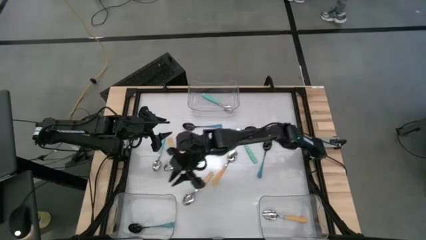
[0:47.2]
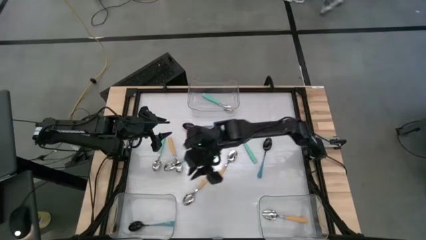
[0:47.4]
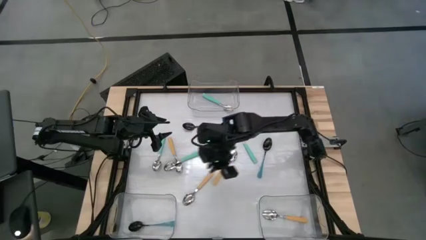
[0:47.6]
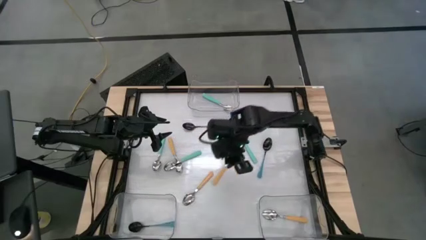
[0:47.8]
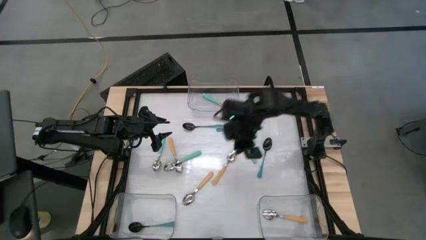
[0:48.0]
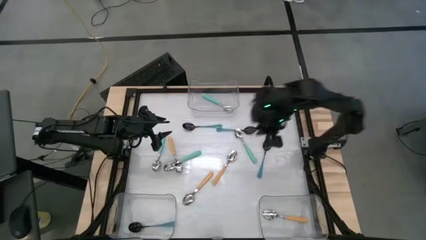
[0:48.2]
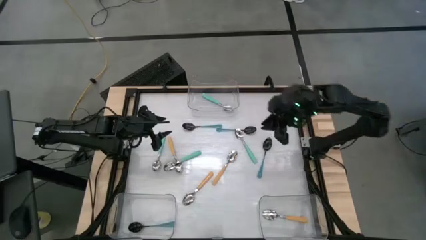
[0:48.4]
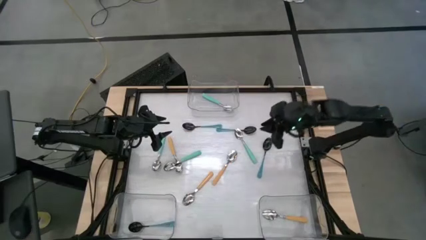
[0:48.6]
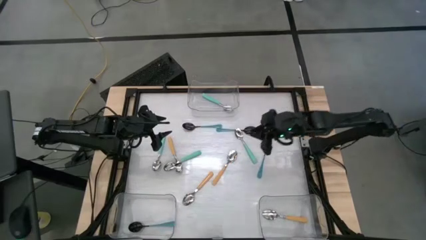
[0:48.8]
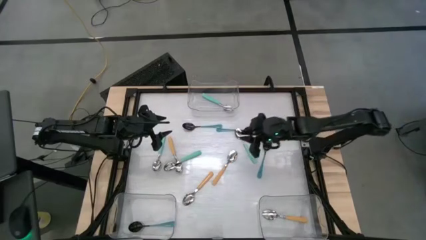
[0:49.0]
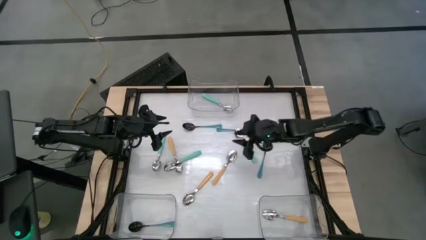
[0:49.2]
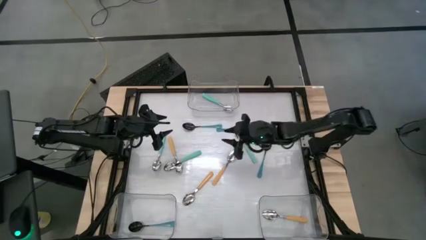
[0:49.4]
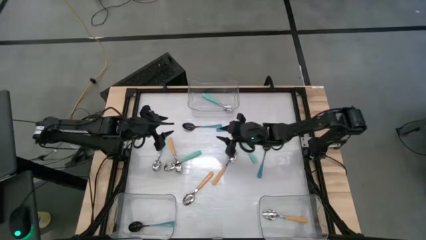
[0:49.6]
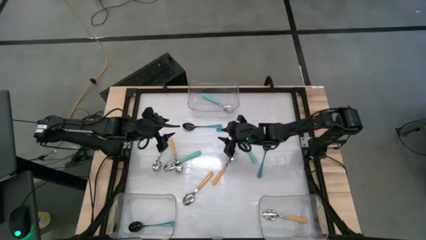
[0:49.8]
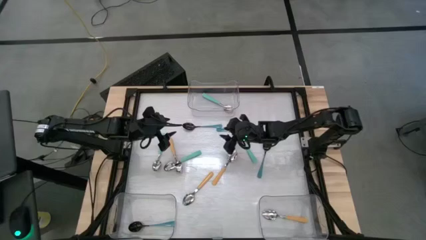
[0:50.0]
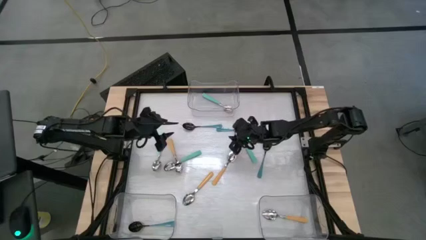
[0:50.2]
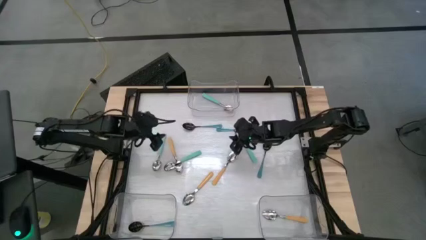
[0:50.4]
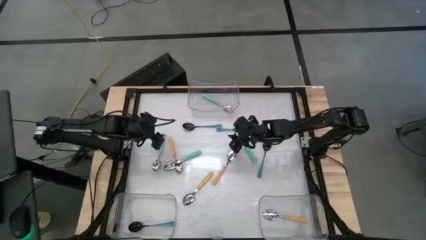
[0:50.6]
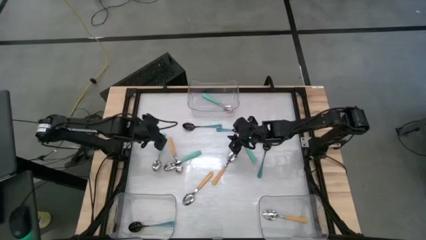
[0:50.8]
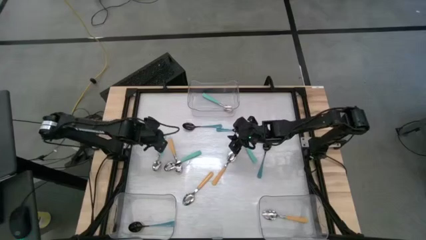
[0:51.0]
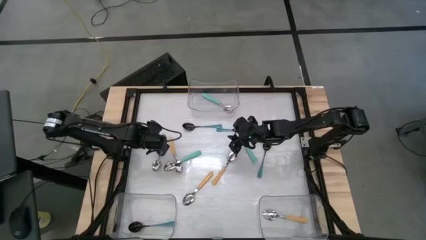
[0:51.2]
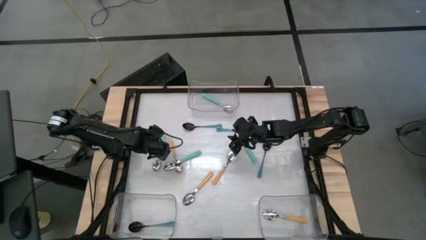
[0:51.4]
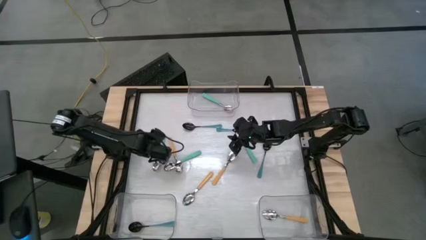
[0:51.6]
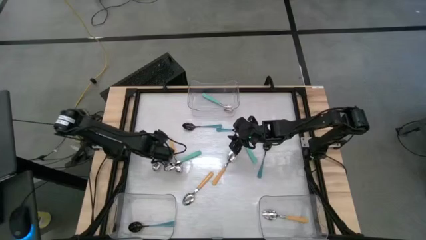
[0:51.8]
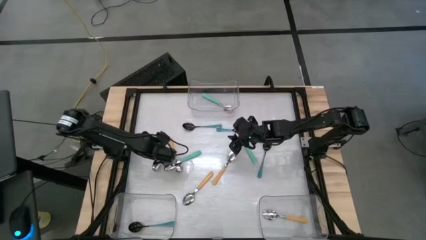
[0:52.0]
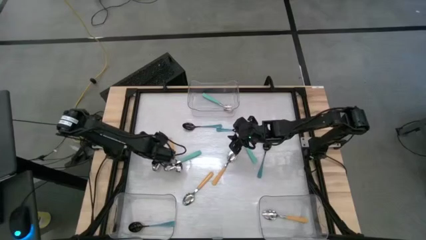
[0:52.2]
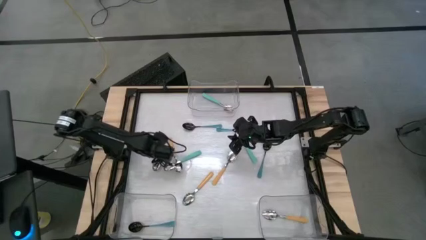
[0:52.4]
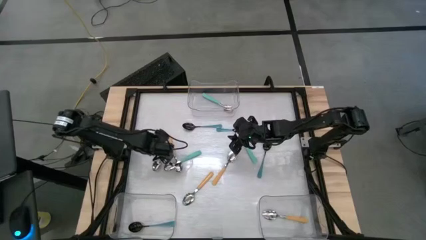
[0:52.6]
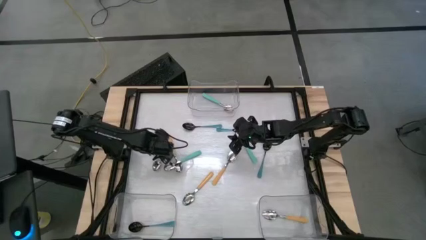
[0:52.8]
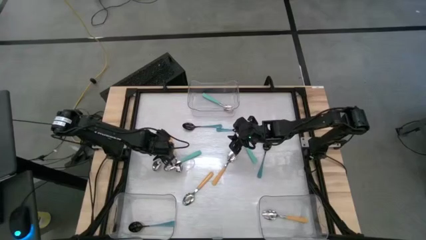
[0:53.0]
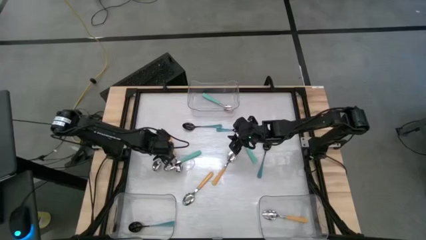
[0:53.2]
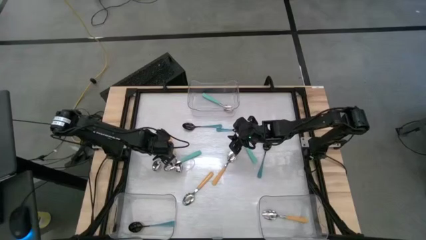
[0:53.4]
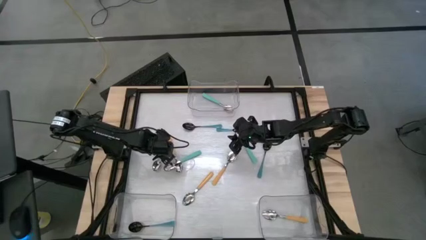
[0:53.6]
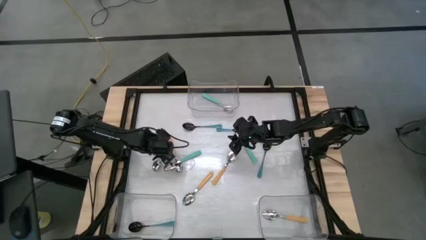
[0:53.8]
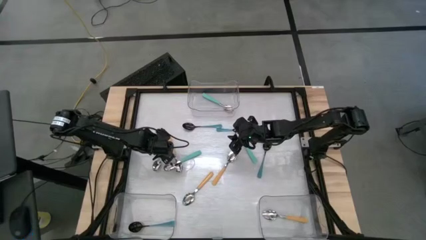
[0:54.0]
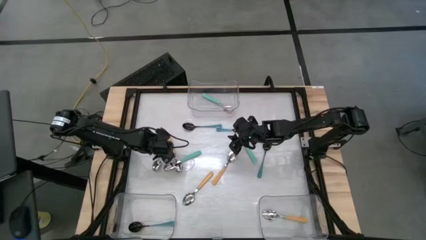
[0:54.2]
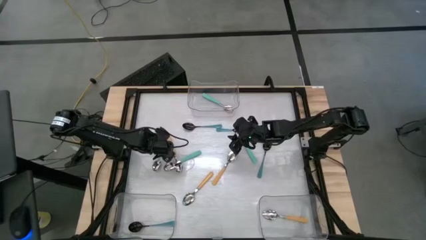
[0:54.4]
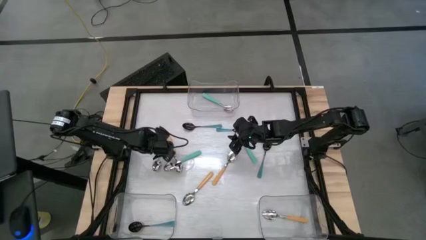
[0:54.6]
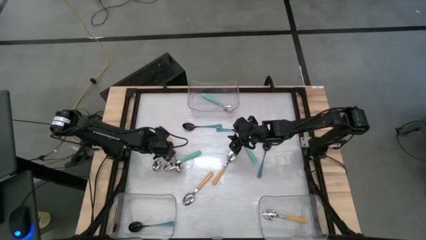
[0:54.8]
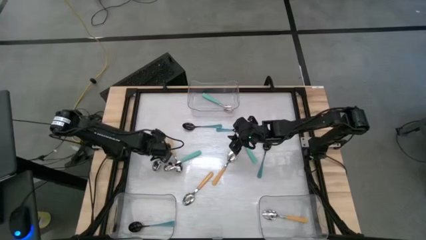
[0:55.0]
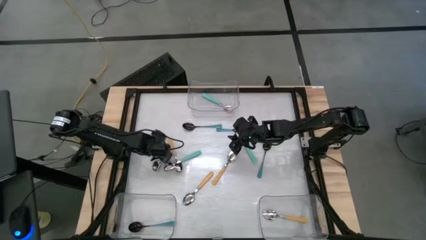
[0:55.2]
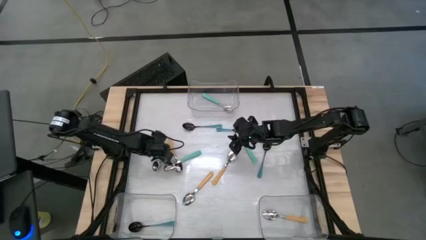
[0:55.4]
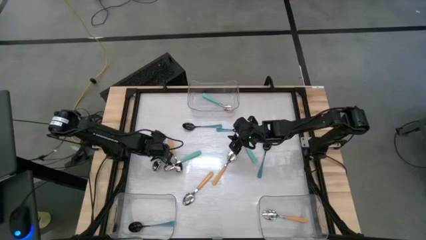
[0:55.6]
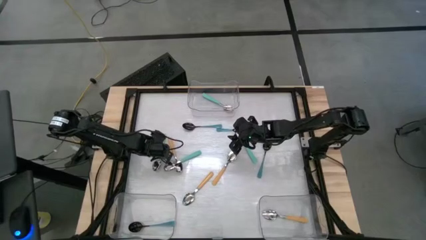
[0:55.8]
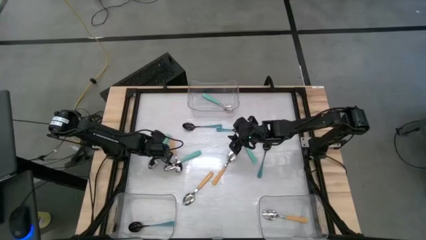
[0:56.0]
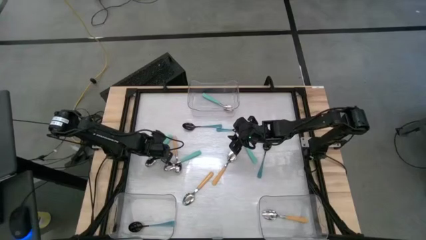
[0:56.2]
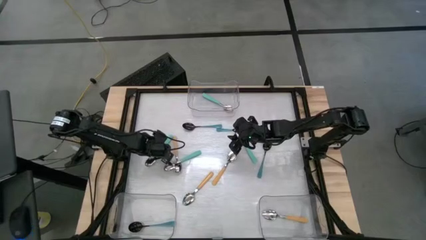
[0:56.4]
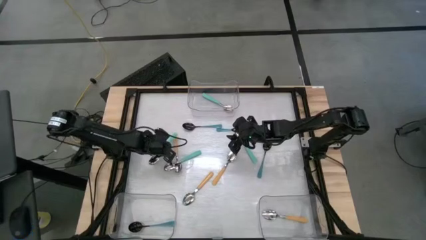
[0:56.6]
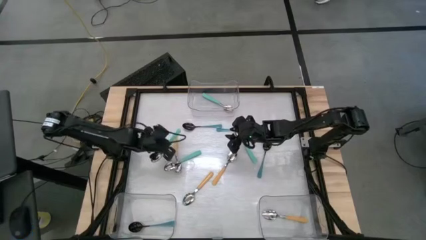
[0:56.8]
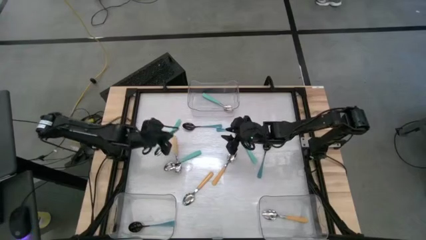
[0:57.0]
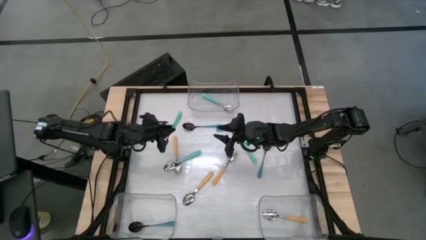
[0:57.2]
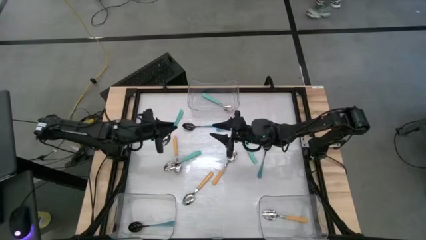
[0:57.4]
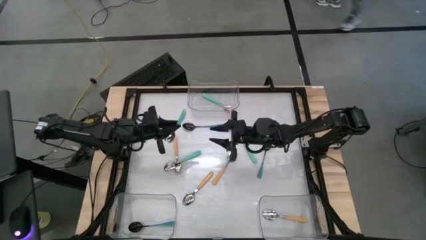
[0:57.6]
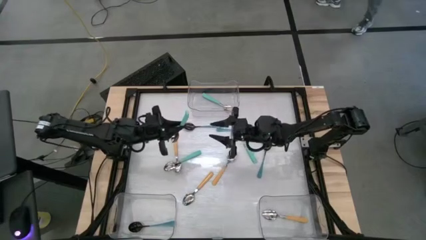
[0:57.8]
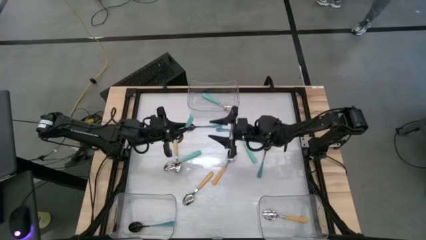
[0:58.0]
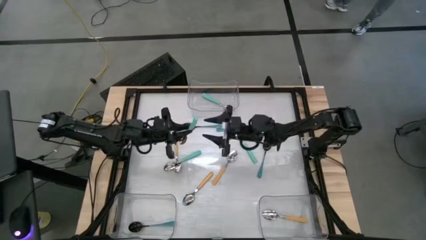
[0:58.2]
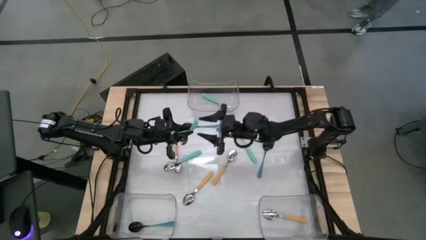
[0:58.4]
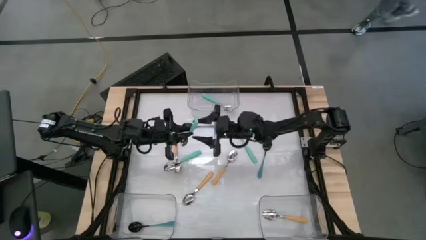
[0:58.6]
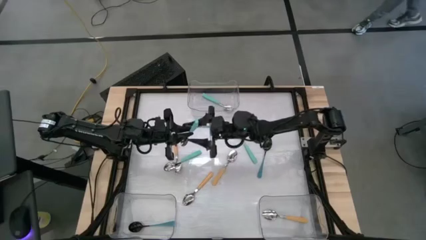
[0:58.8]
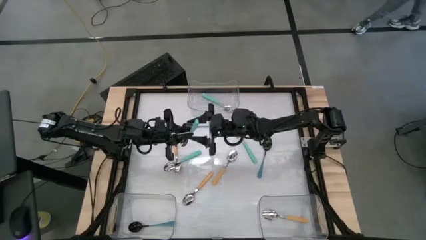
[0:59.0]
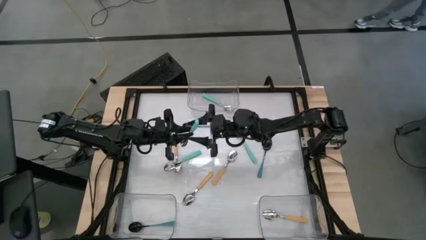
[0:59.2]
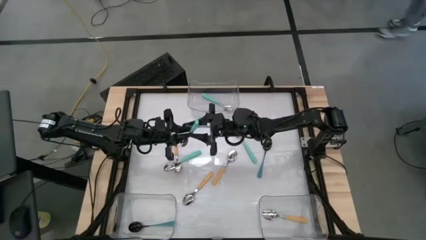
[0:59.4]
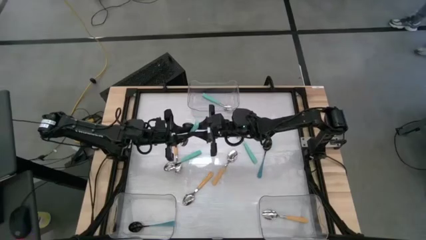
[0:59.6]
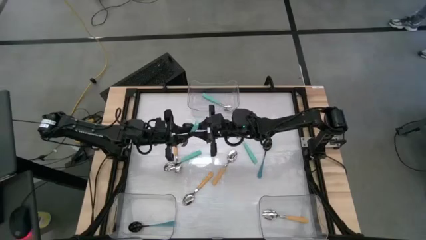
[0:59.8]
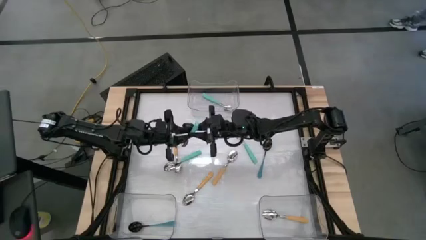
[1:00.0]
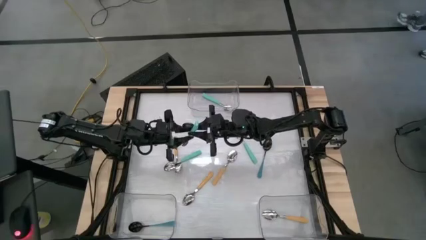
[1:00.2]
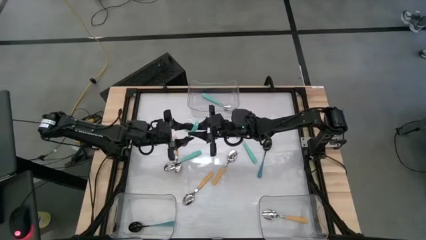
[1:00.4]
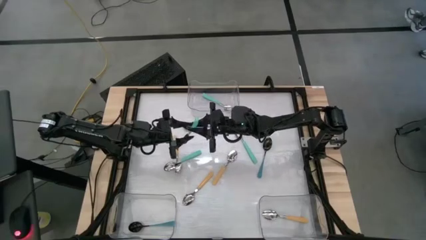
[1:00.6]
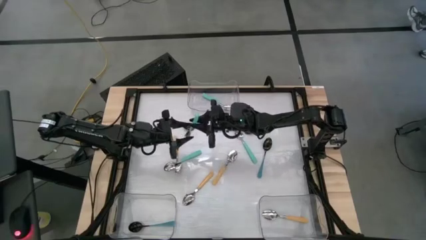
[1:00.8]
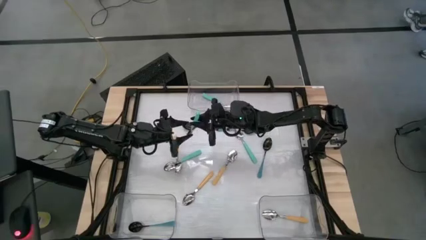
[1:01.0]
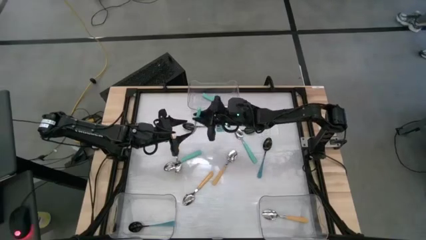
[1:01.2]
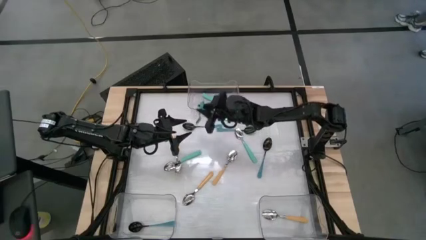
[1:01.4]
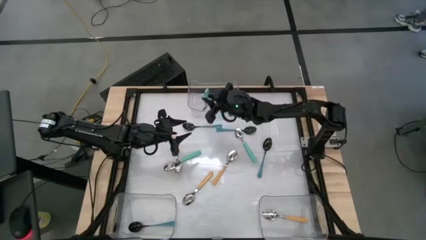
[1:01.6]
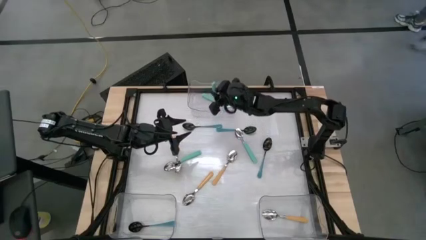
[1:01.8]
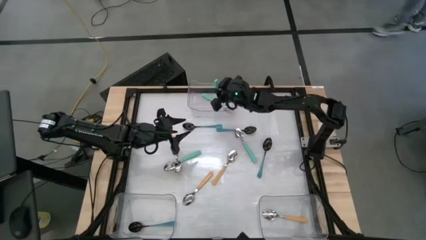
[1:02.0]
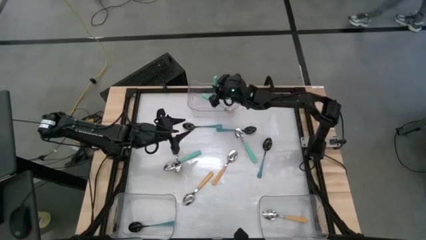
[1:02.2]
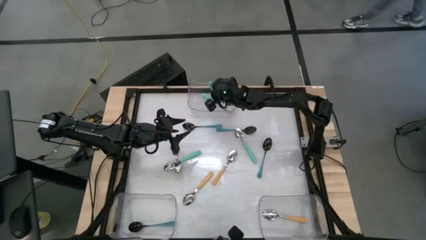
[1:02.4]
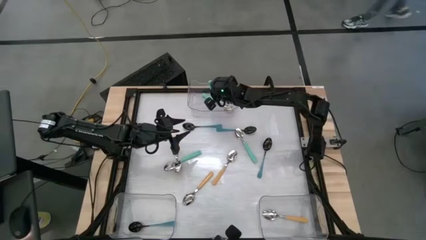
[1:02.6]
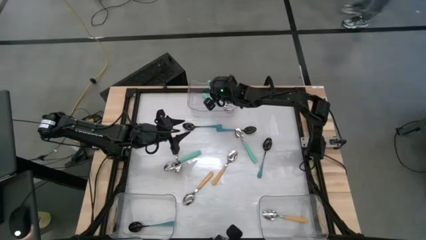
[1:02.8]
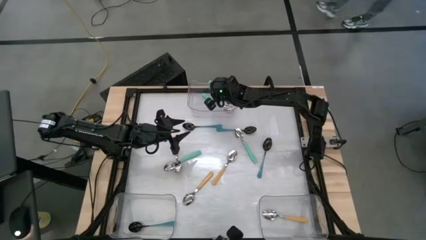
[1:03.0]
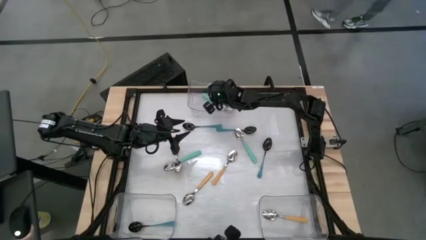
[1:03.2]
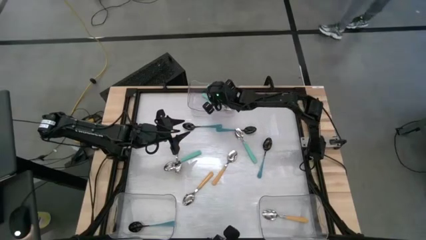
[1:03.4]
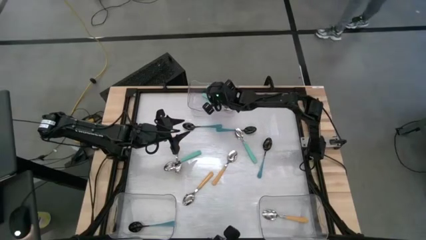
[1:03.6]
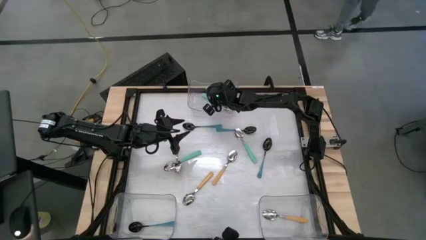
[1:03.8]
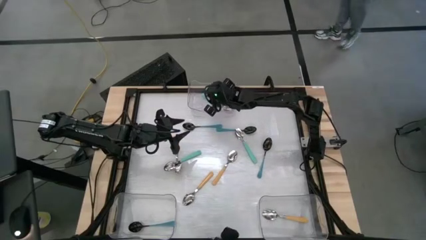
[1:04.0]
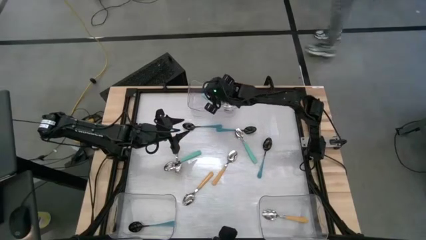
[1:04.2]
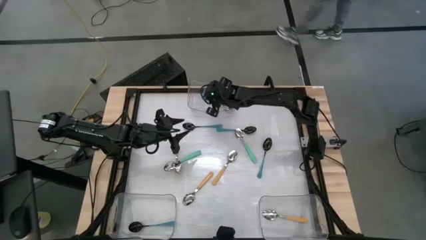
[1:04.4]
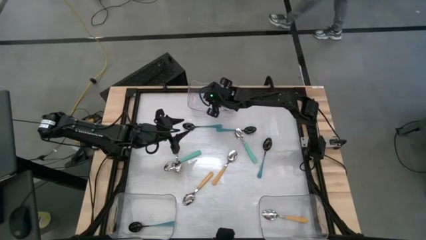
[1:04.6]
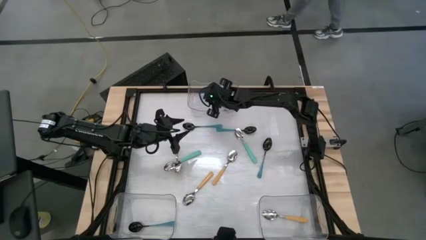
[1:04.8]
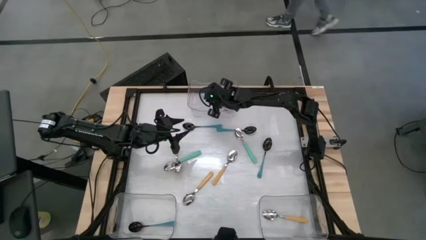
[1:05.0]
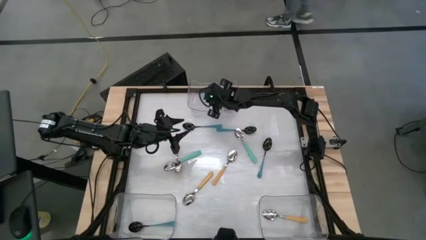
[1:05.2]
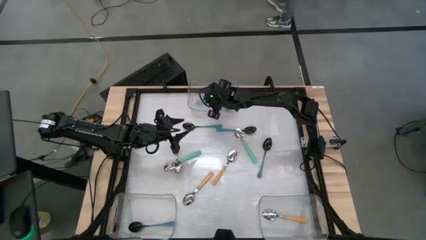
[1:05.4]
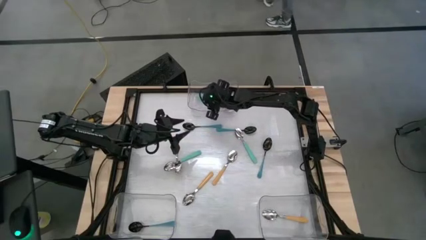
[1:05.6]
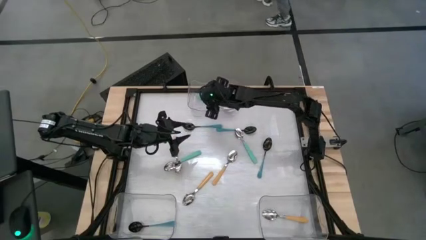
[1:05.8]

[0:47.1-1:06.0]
Task: Sort silverware by color (type)
Put the top left blue spoon into the top transparent bin
